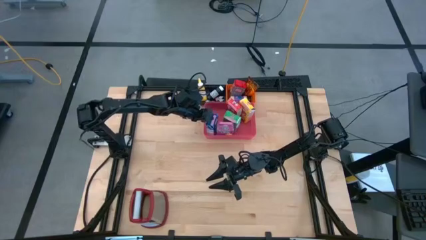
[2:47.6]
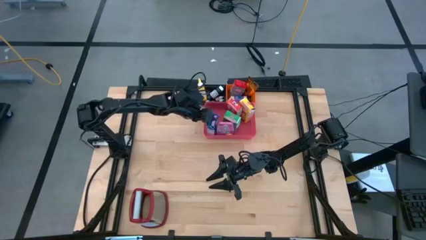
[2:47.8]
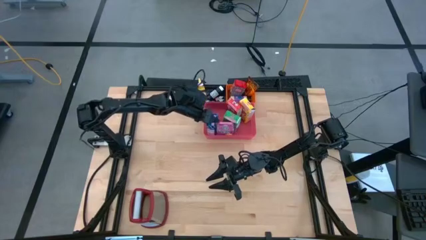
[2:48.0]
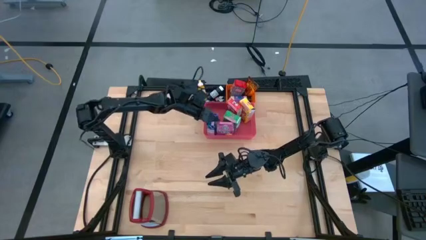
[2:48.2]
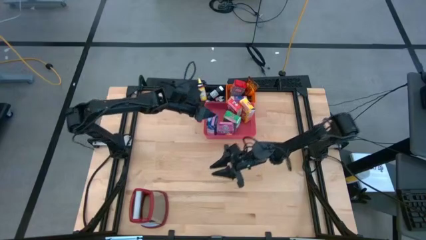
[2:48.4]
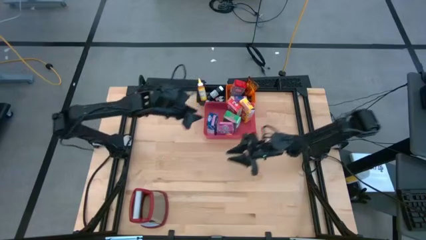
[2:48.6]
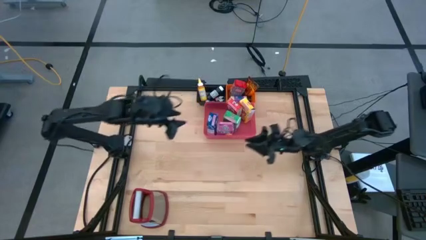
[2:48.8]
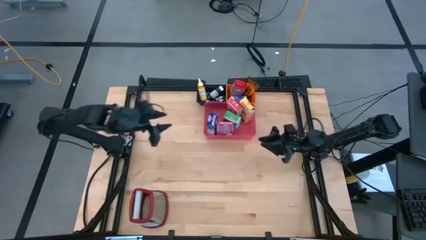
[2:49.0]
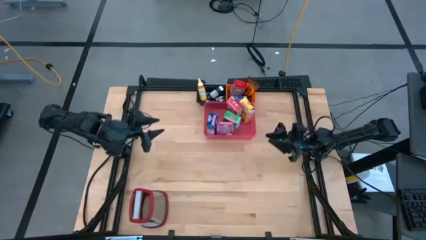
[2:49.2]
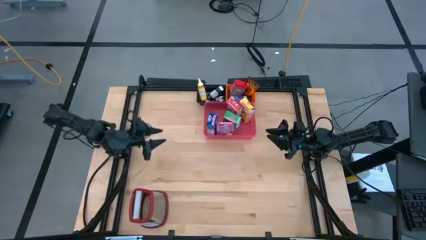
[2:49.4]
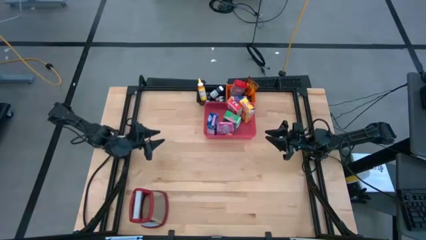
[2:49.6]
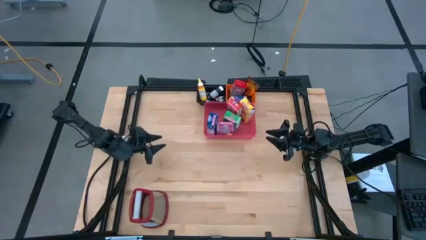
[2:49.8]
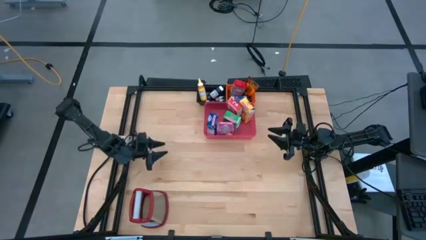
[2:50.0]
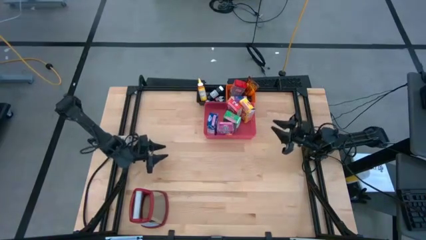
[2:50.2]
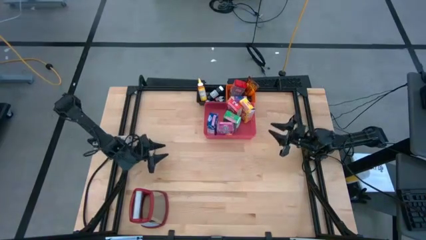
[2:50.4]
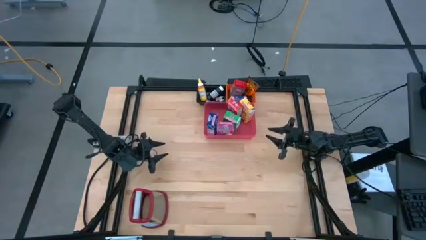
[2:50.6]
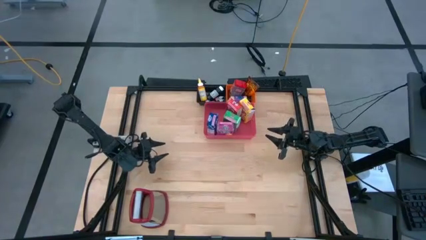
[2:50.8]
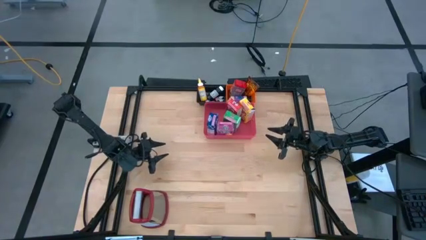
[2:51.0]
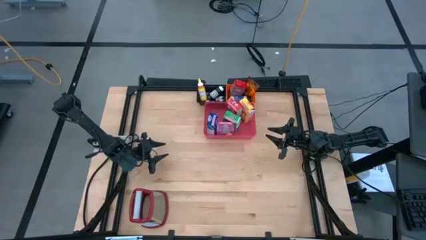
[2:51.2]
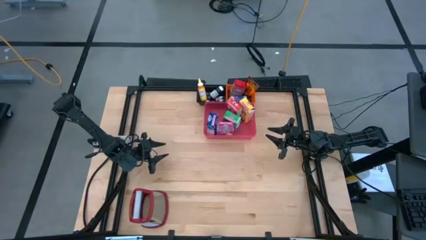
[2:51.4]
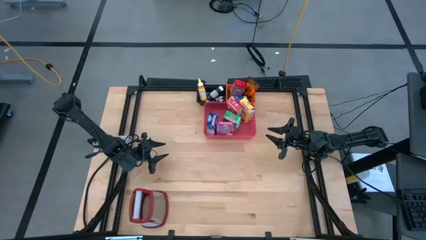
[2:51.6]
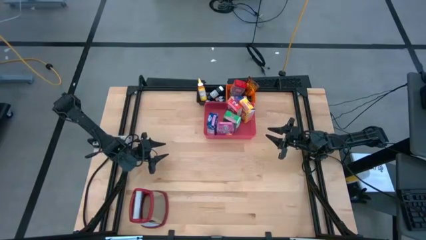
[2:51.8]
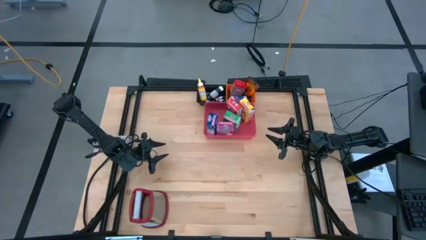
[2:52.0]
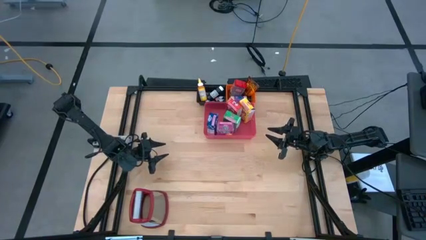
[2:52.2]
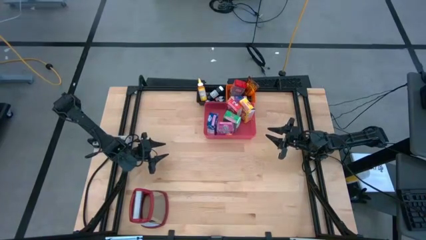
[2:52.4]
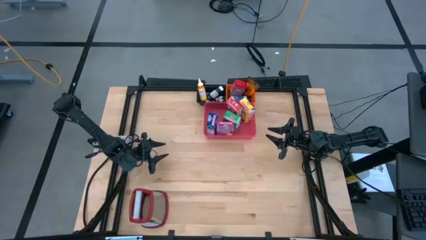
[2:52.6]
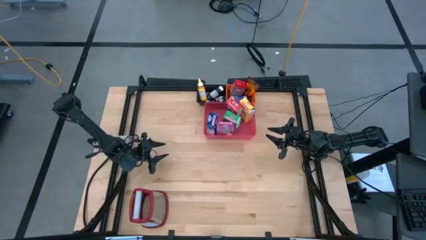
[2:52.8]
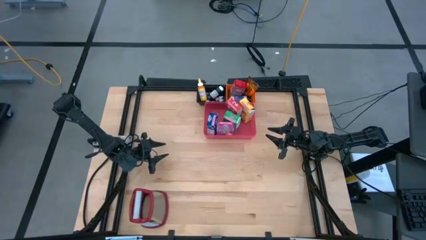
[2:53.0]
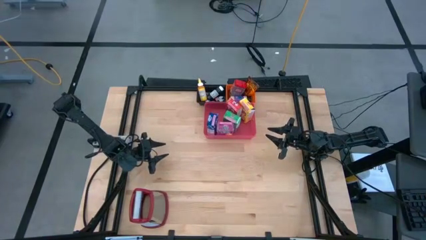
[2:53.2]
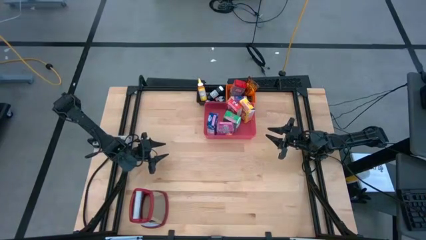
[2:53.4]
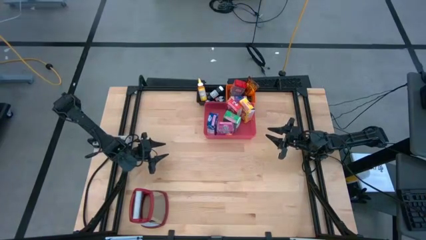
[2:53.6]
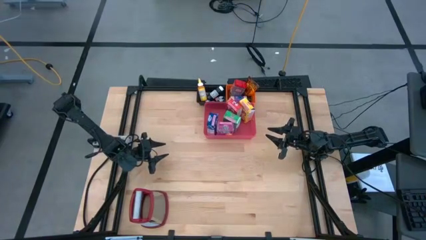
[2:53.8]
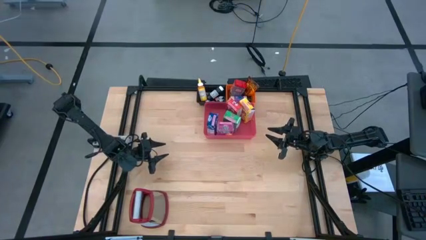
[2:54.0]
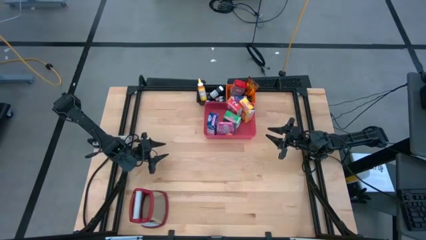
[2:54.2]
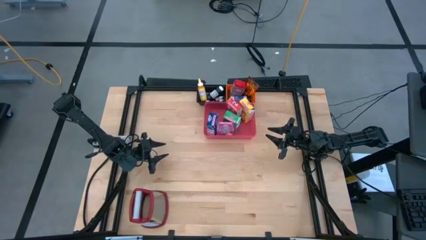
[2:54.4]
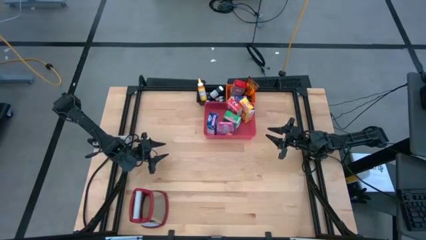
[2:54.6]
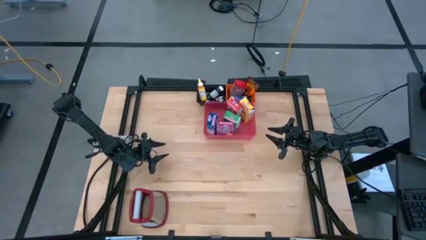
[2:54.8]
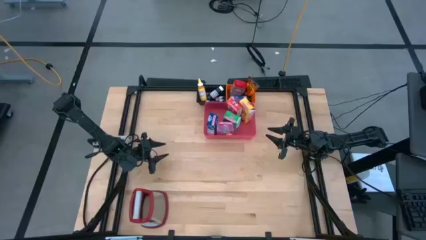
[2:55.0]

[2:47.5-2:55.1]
Task: Pick & Place Kitchen Items
Return to Home Position
